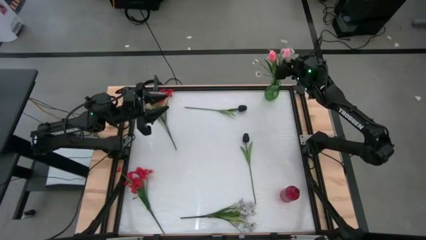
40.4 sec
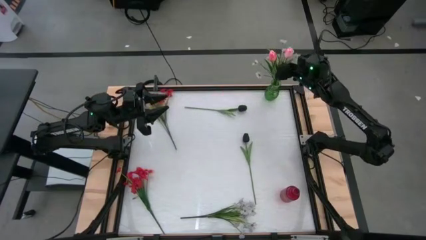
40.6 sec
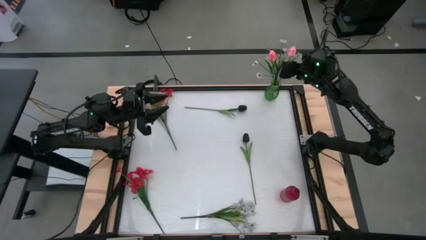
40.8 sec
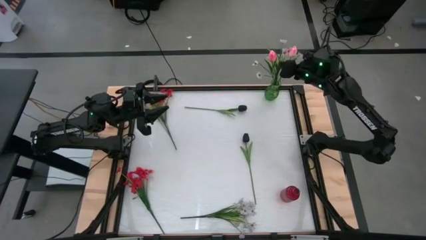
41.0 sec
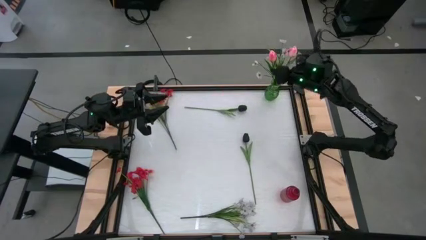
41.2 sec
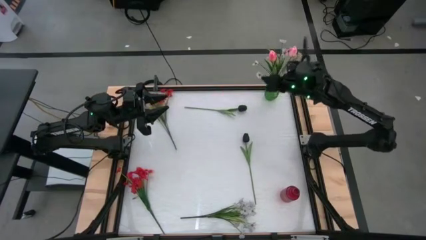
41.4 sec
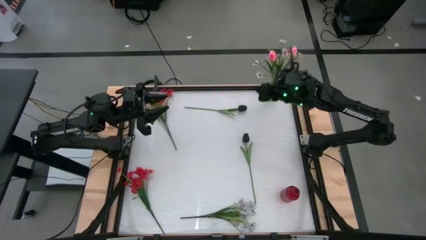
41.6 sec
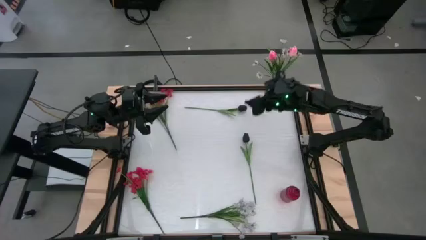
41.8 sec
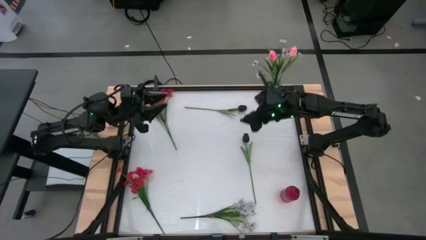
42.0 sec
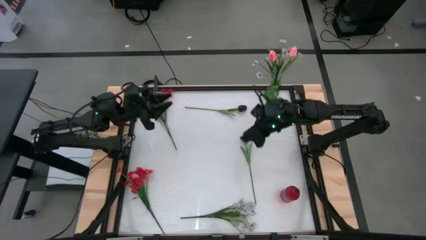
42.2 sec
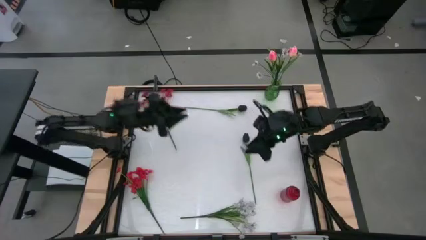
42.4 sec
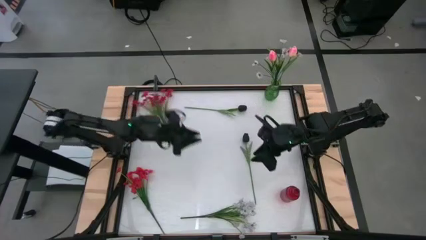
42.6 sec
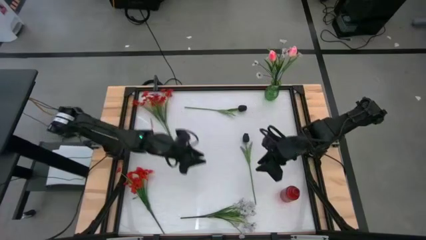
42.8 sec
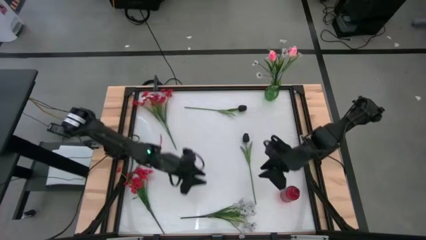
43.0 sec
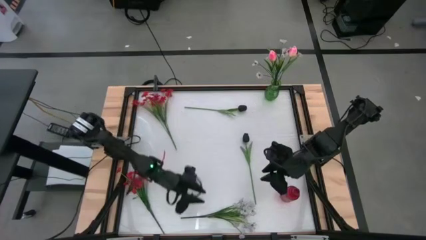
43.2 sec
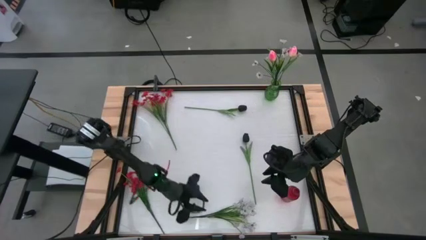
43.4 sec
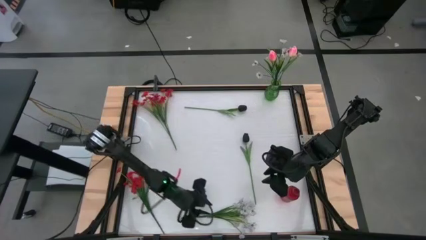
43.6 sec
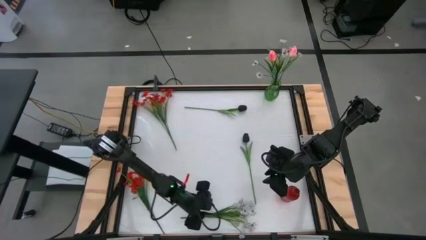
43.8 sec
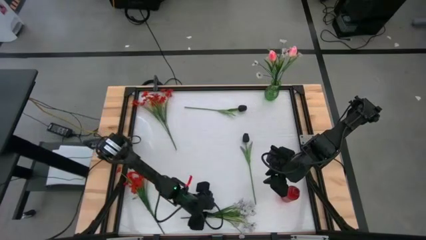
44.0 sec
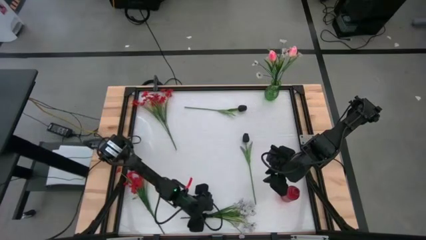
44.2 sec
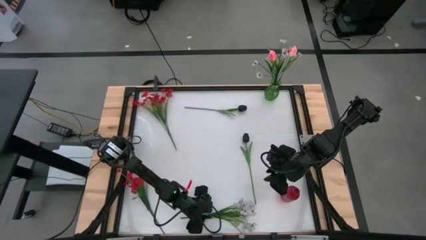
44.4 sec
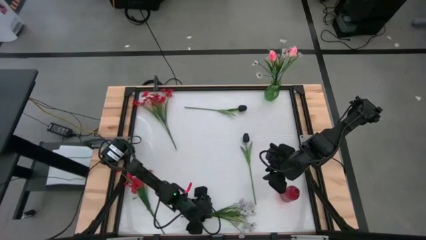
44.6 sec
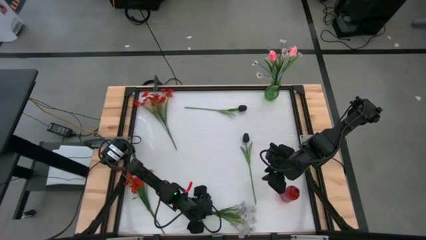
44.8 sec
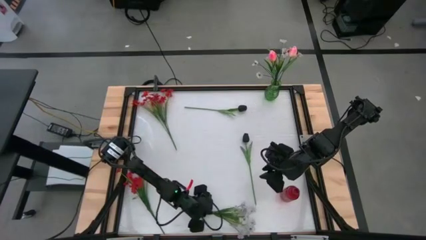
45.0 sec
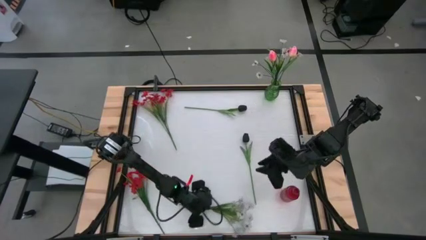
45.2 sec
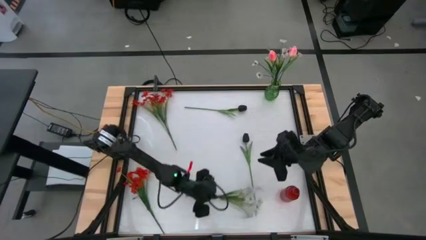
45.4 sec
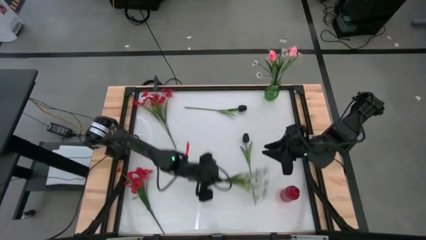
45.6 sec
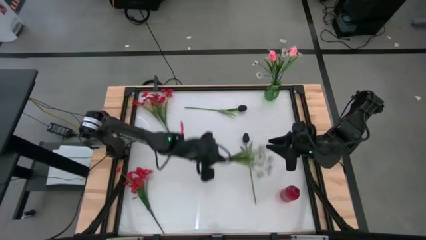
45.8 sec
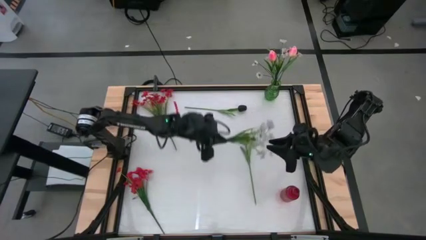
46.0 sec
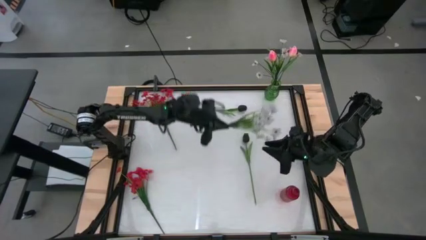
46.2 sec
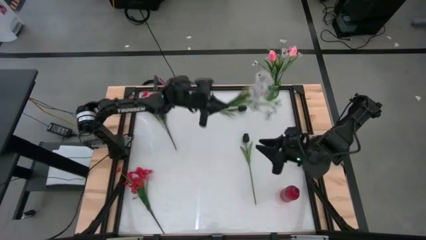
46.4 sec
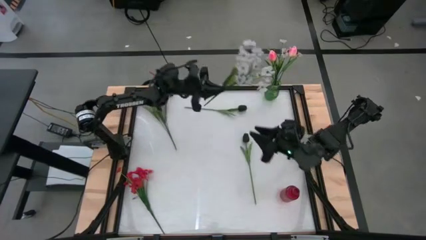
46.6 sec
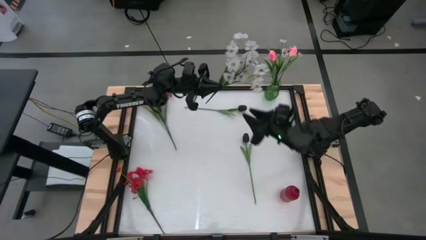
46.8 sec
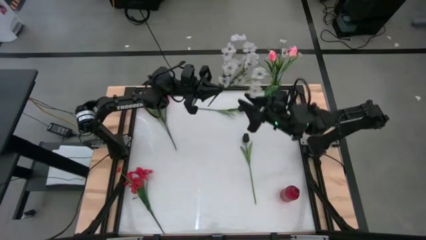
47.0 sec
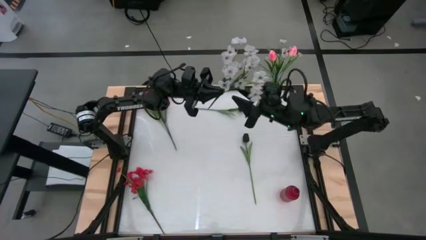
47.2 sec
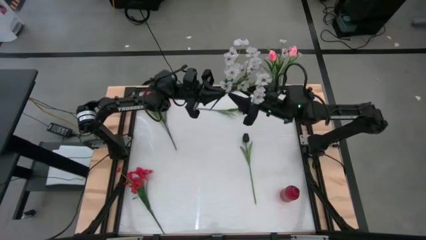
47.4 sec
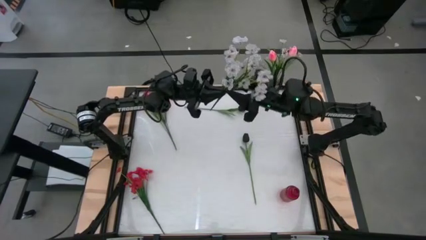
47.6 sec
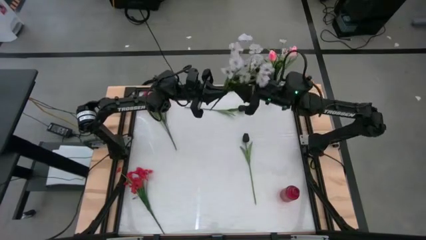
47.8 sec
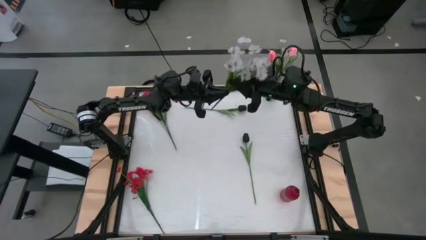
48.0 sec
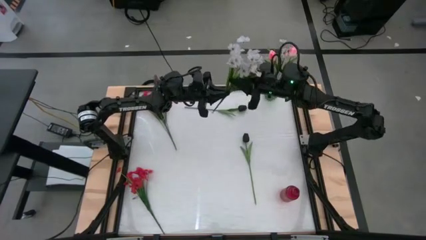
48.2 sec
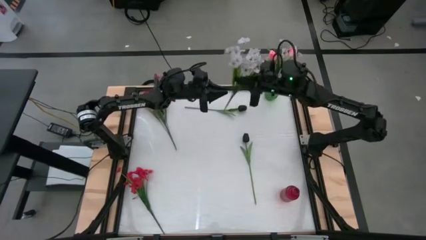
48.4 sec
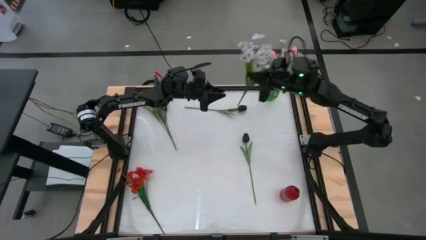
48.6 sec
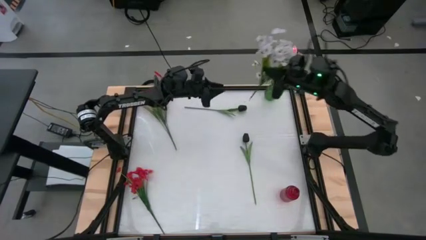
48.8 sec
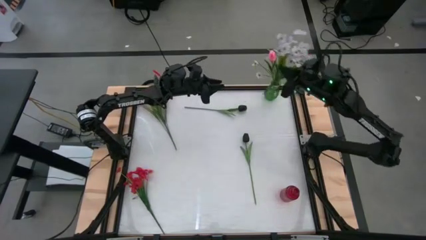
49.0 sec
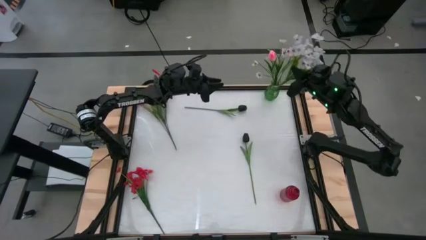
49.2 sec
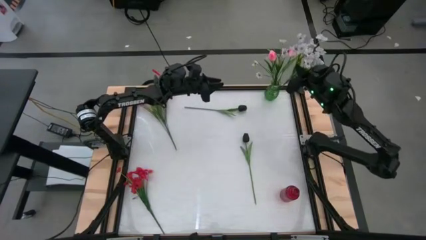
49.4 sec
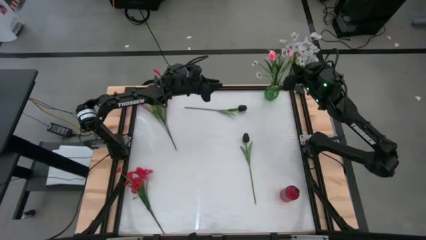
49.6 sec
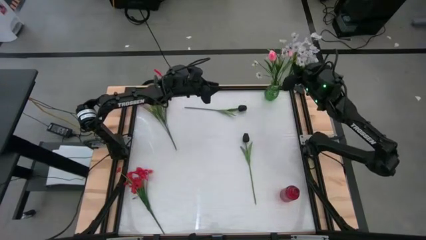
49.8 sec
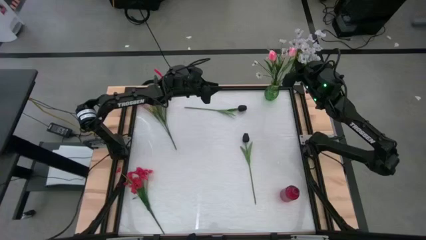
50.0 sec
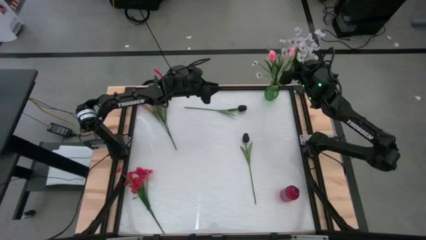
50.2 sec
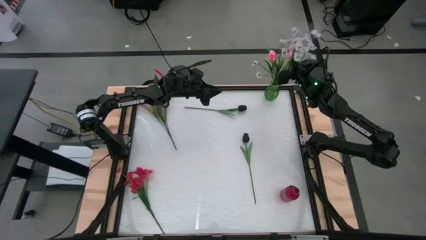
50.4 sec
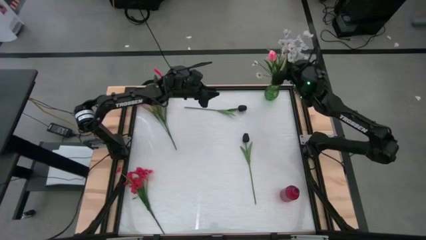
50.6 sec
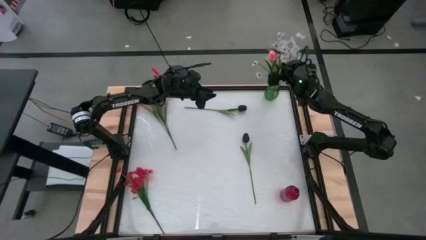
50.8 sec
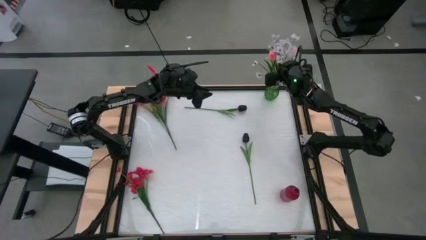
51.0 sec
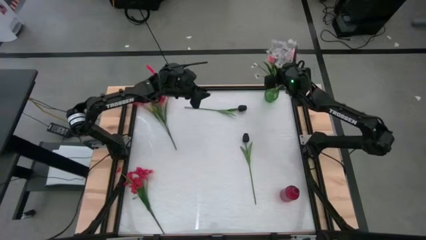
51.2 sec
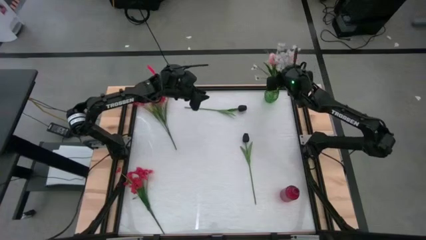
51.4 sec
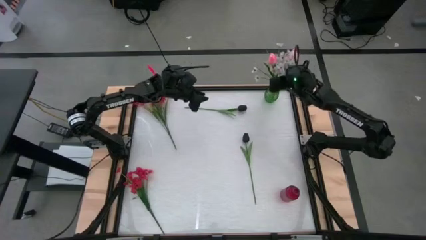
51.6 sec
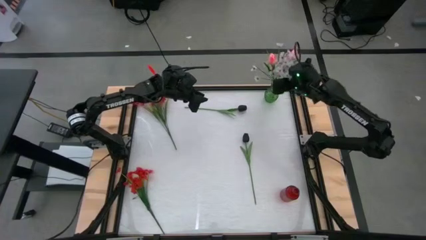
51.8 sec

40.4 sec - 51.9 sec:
Task: Sort flowers into vase by color
Put the white flower into the green vase
